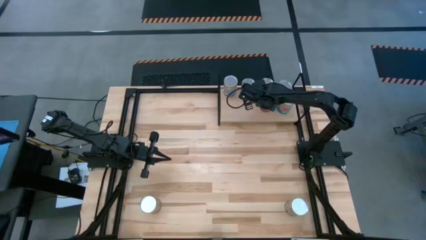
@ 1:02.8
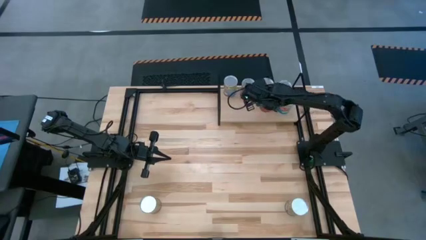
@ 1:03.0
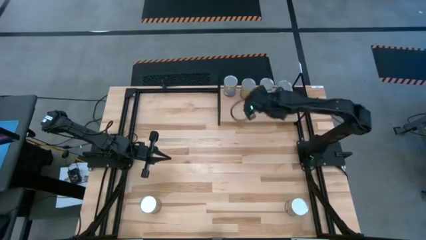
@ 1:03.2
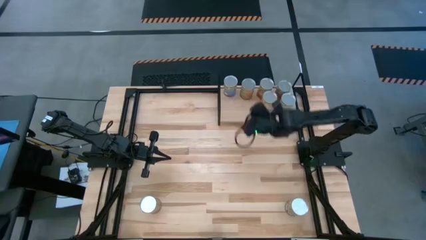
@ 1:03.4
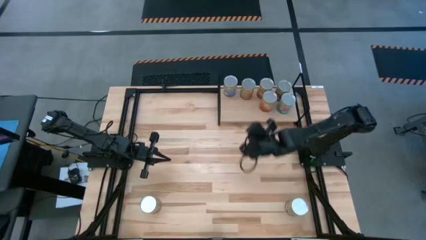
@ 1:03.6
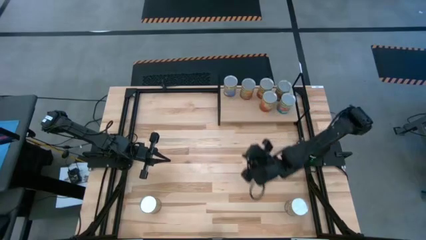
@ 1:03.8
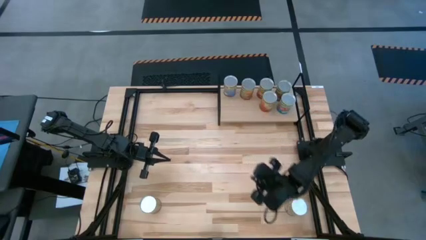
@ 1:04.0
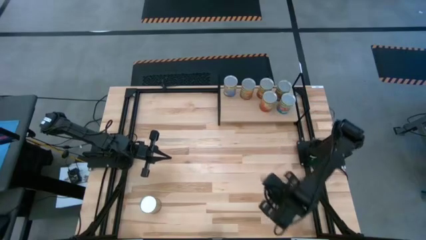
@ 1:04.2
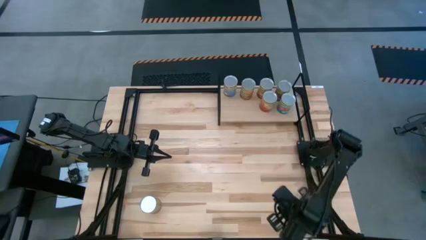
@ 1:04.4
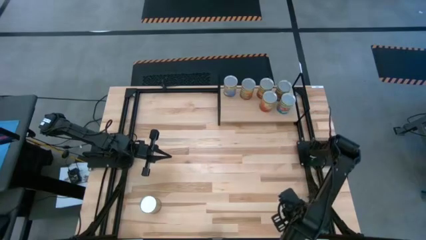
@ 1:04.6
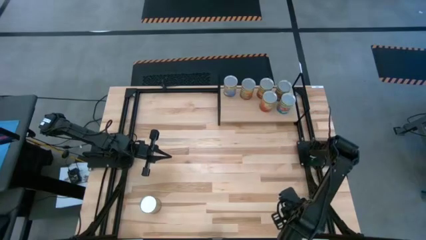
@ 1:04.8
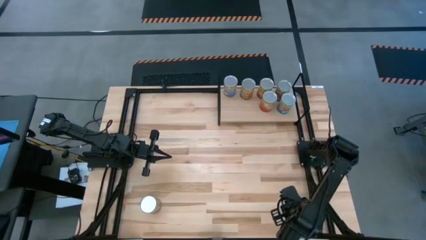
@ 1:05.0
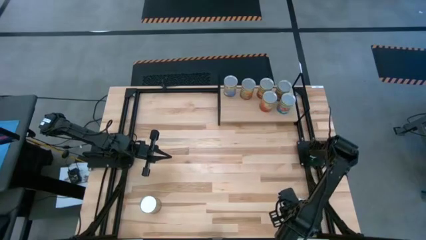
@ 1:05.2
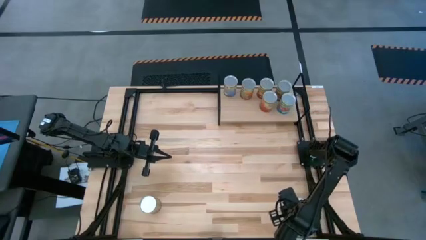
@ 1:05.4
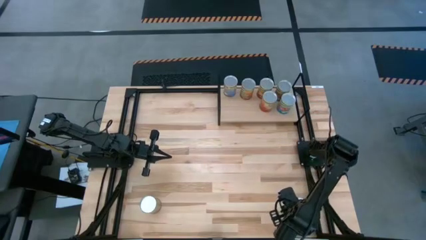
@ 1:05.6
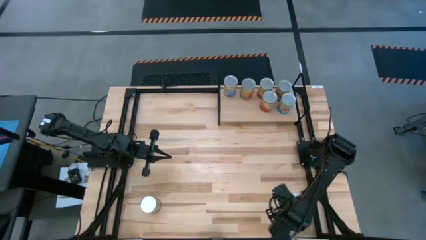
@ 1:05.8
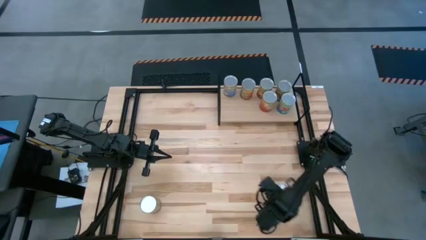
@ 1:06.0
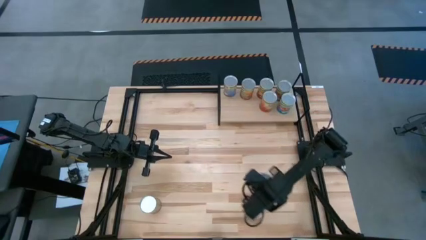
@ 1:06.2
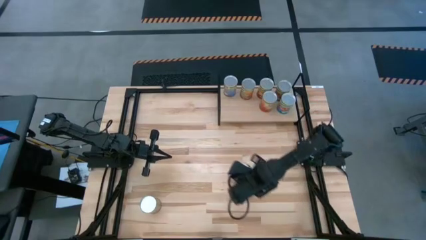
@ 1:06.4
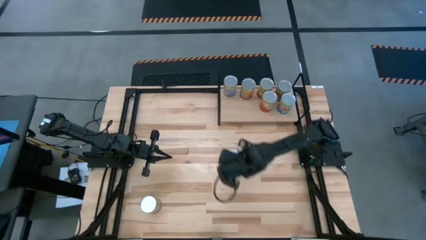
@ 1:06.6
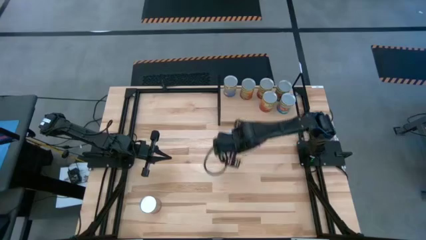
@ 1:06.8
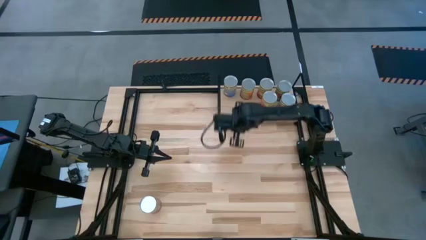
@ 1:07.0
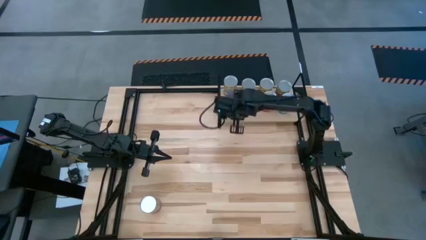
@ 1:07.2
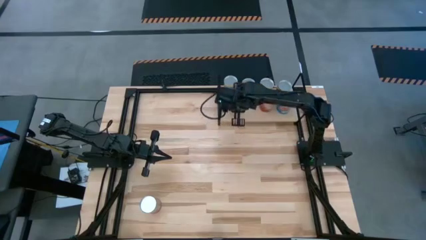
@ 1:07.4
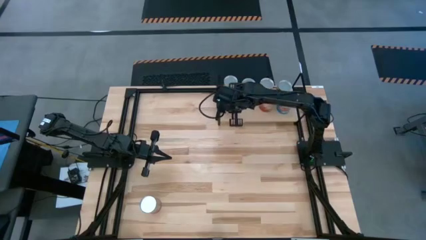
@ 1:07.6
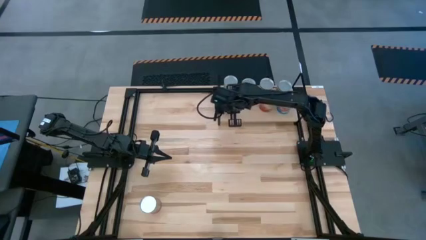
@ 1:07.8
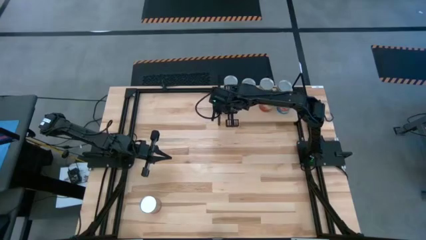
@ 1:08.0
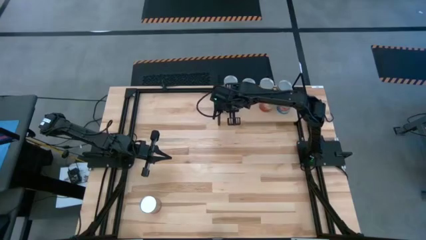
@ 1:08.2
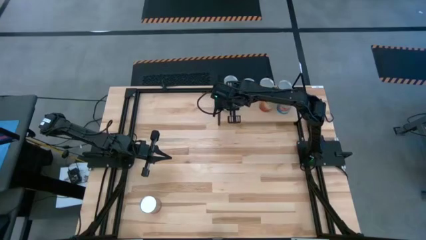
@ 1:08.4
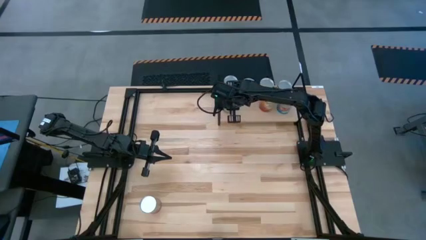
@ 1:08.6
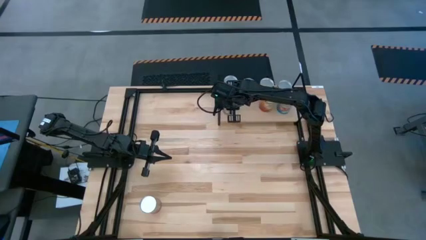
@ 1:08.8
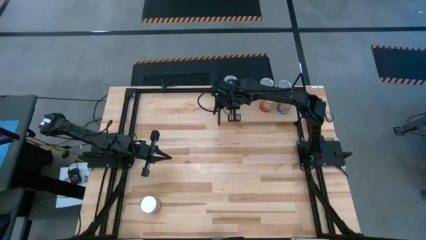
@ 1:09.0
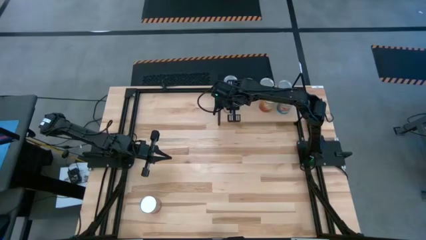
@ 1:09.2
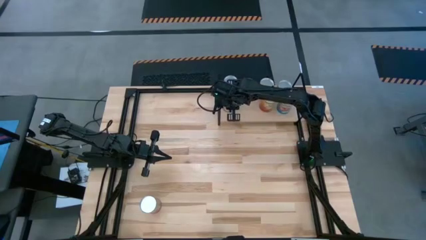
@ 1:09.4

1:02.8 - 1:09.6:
Task: Pick and place cans onto a shelf
Put the canned peaches on the shelf aligned with the other canned peaches

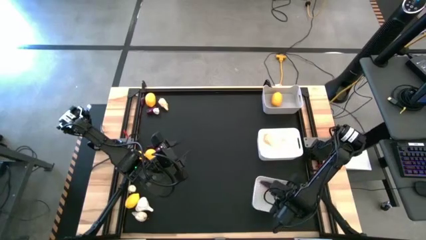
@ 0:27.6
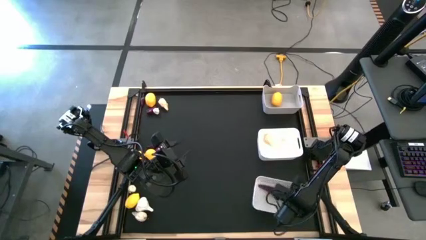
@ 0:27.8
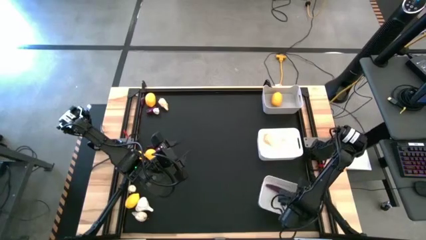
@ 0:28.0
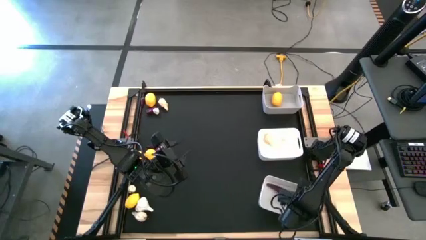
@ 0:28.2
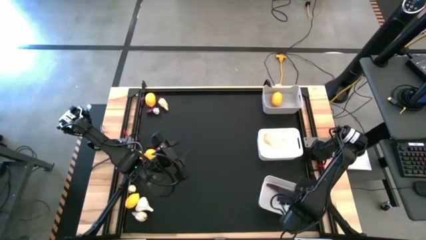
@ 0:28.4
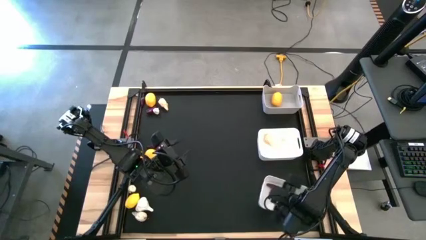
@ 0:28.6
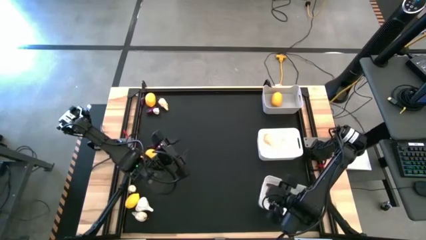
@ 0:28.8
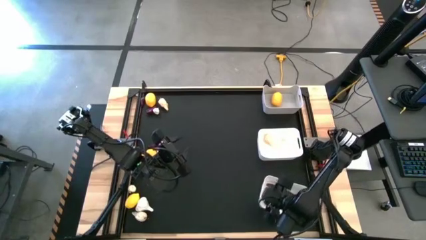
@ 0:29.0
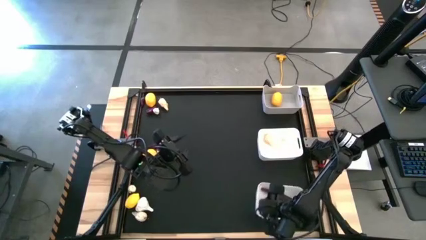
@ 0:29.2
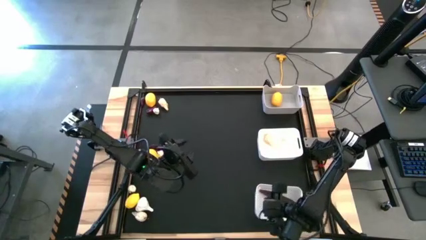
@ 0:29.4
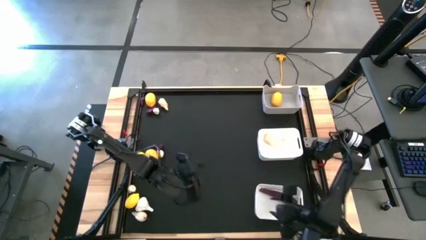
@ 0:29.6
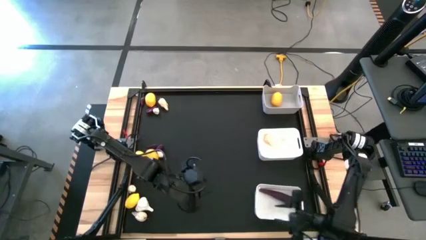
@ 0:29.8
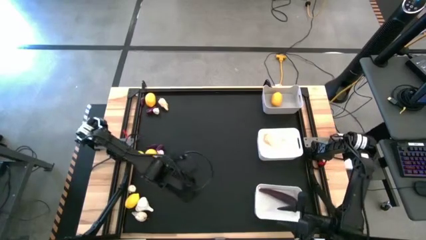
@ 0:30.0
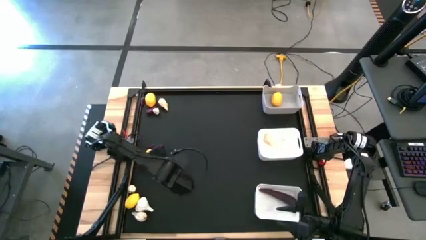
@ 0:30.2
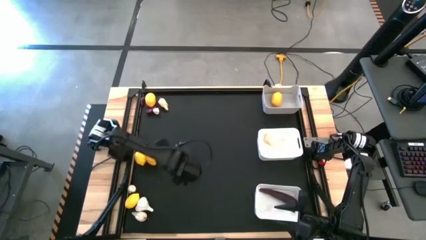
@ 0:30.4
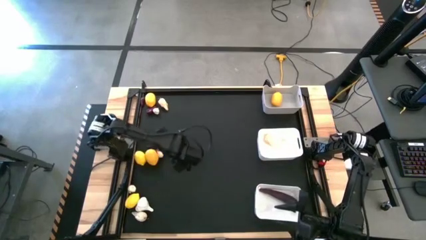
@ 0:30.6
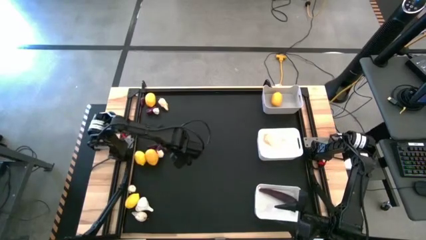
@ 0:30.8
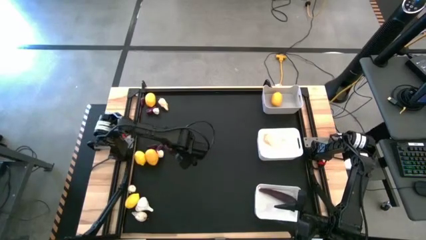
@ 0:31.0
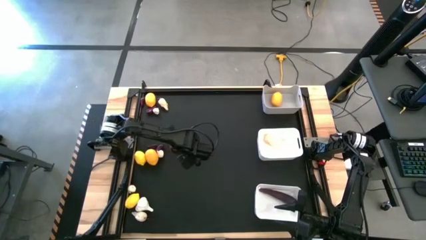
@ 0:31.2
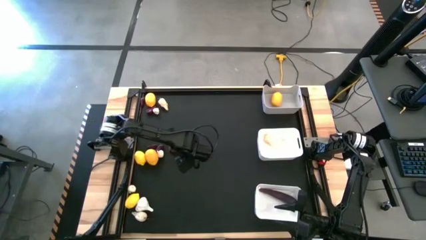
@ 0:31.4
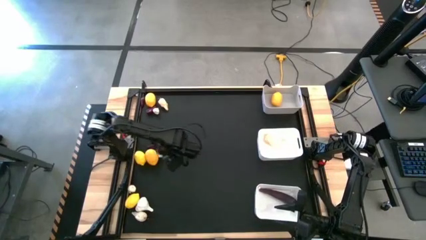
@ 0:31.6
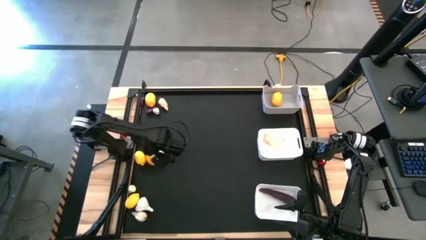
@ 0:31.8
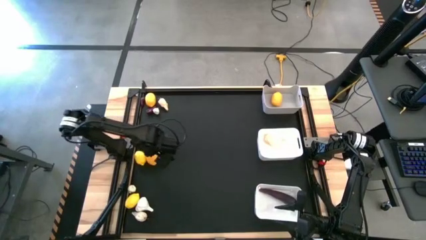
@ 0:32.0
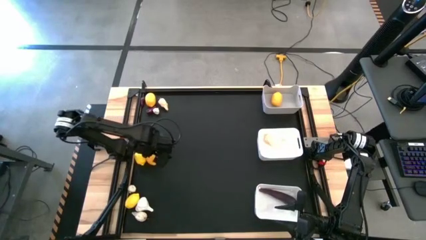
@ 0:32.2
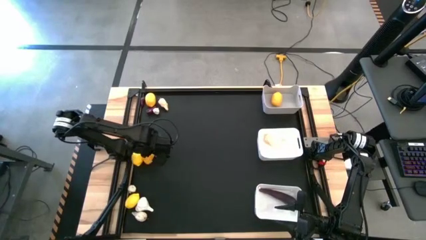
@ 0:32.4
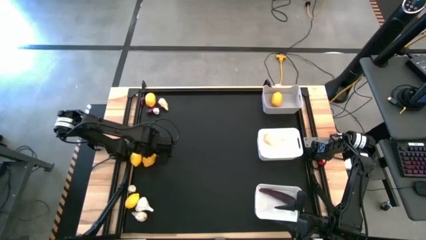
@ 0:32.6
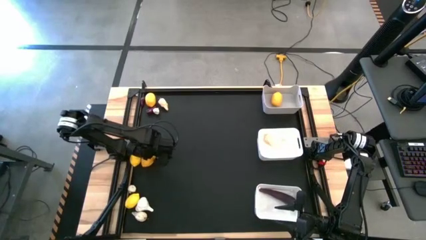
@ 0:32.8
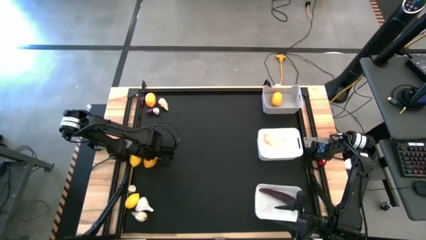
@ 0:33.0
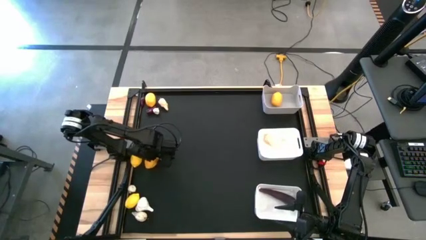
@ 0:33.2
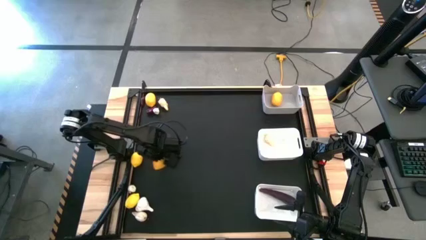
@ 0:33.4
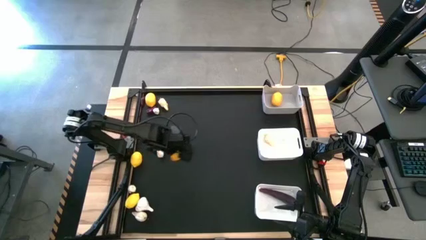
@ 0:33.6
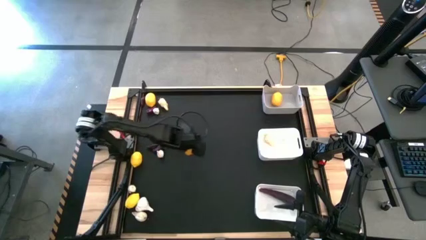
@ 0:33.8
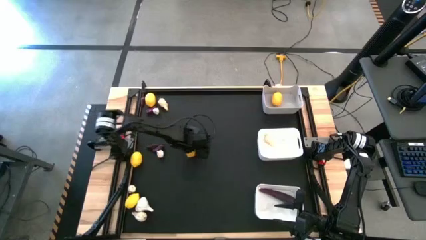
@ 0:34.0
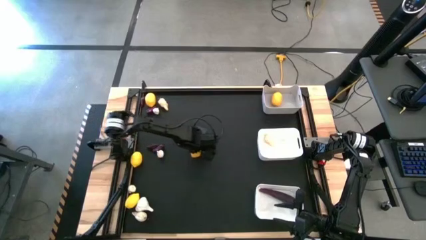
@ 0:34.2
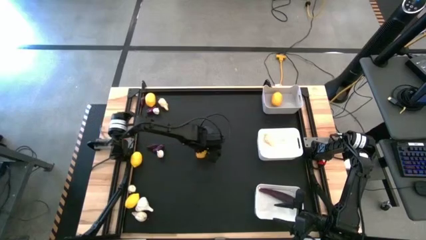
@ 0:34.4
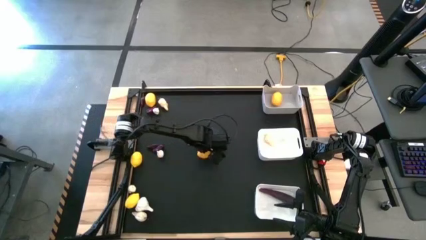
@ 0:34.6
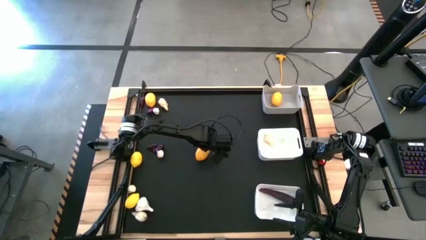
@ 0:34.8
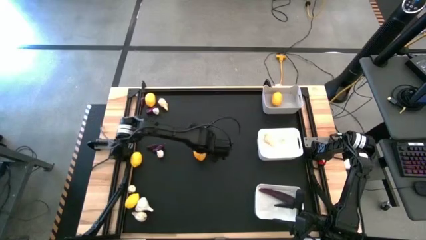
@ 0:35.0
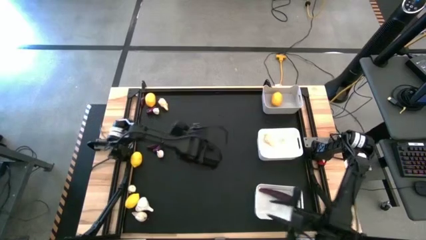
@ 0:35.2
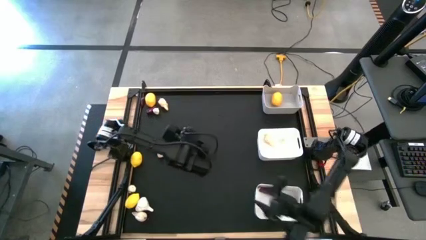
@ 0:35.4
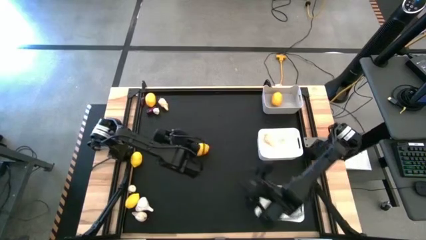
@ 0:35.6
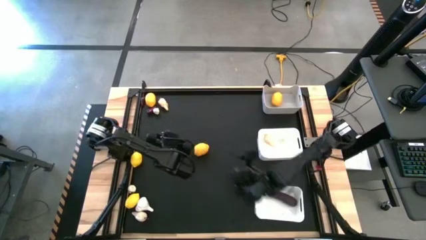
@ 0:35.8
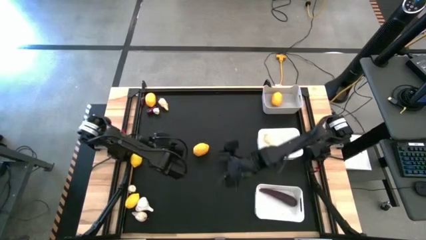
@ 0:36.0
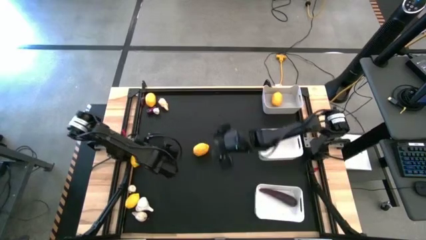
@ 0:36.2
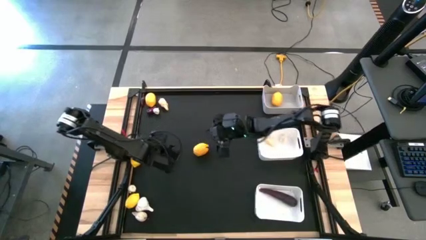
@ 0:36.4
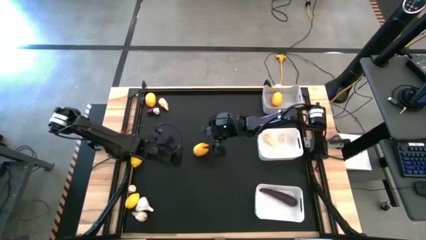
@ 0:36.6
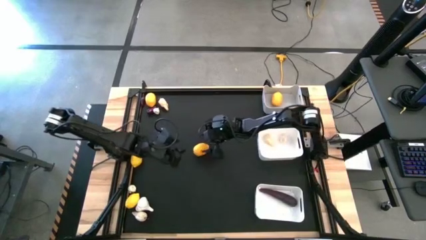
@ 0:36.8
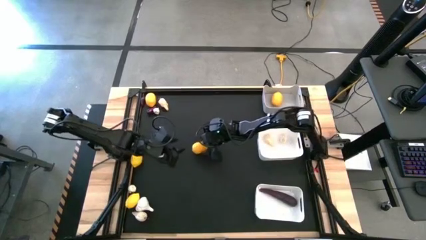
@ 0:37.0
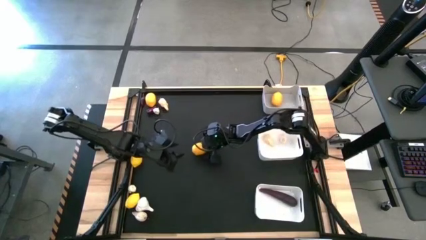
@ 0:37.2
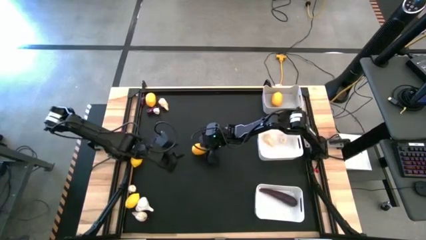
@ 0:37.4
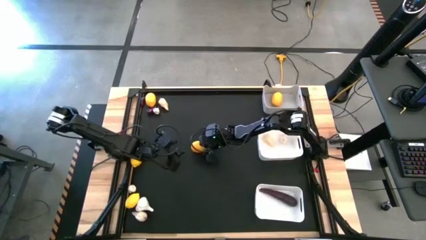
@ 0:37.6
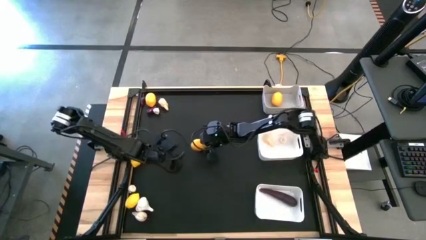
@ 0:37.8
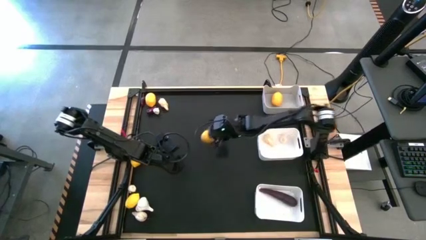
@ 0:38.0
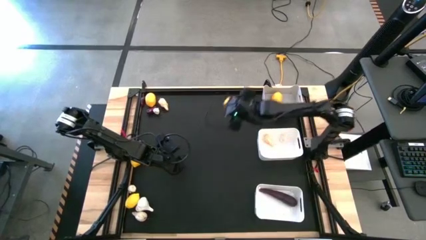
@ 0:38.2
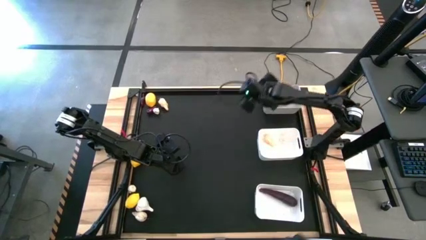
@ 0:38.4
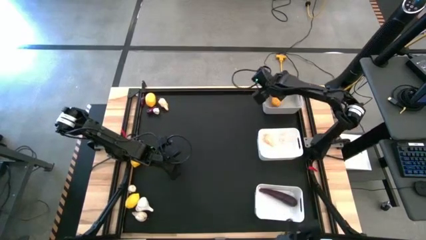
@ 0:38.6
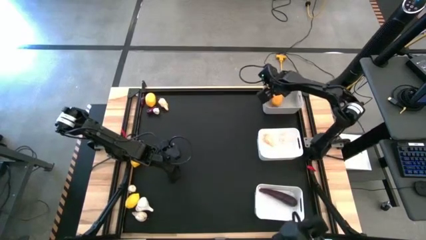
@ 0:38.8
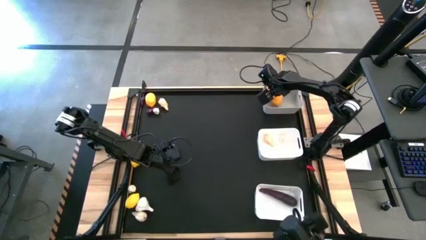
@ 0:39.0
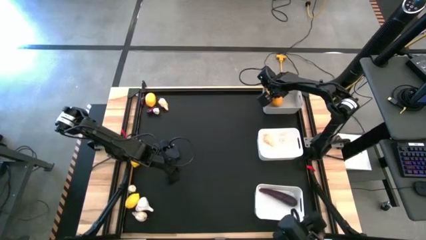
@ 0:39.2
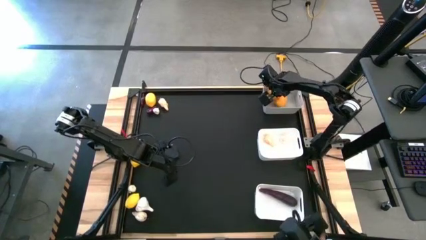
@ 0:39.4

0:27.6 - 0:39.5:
Task: Sort produce into baskets
Put the lemon into the gray bin
